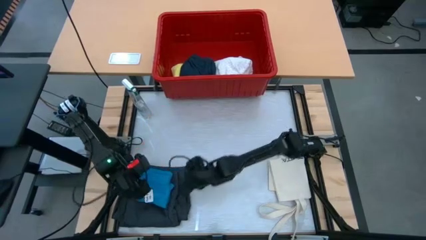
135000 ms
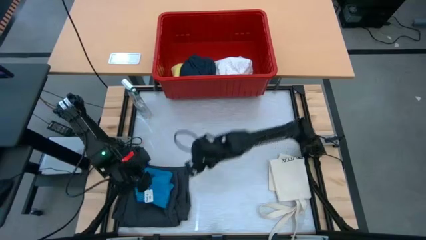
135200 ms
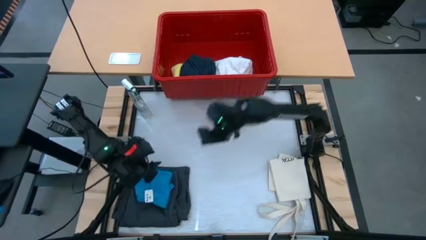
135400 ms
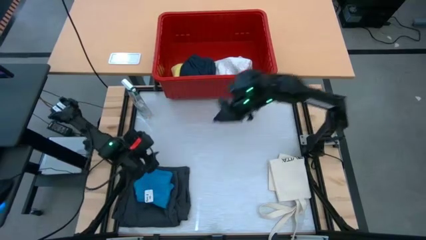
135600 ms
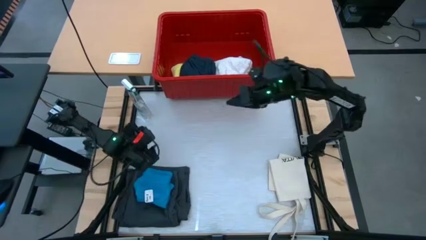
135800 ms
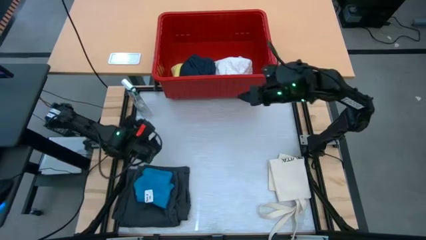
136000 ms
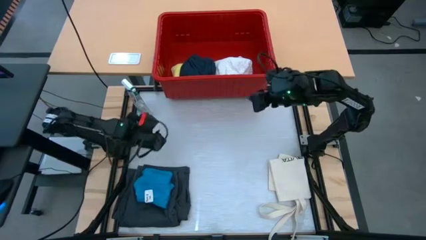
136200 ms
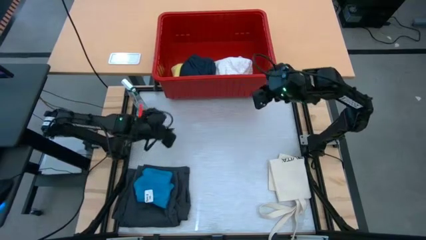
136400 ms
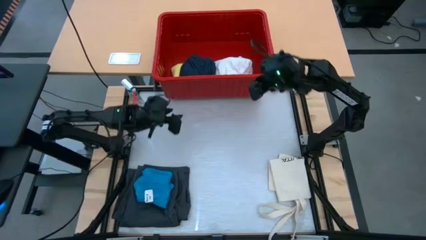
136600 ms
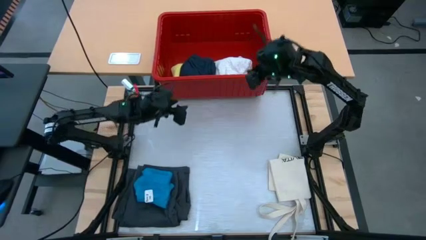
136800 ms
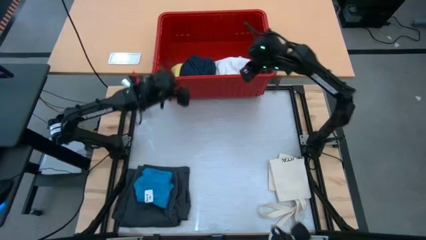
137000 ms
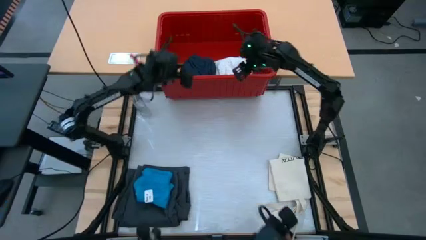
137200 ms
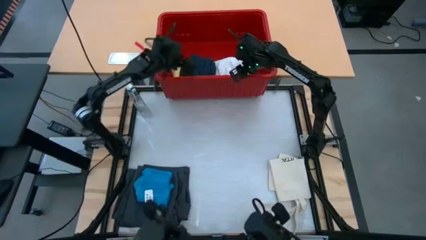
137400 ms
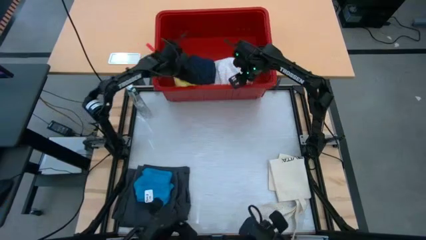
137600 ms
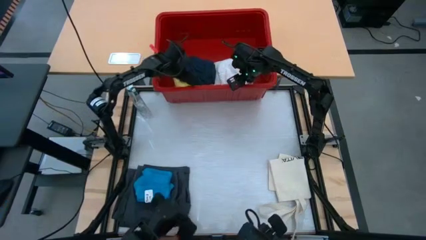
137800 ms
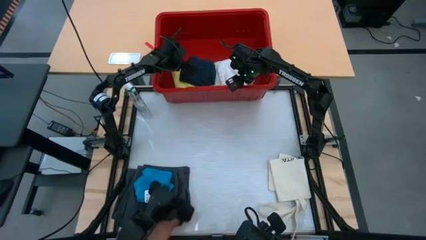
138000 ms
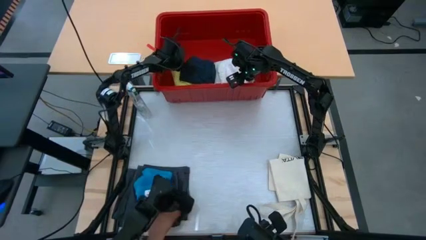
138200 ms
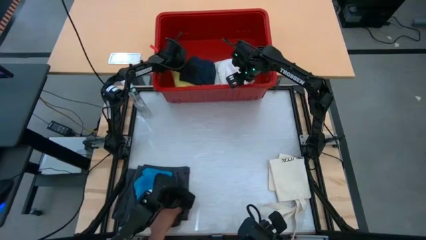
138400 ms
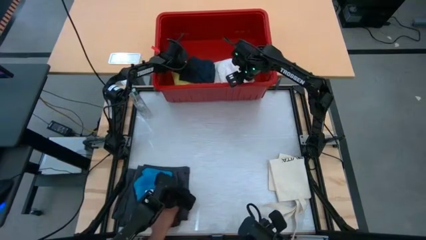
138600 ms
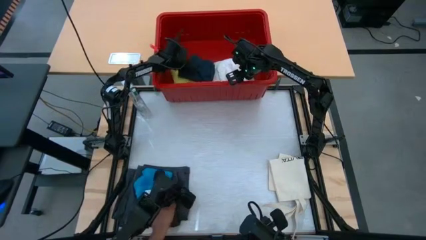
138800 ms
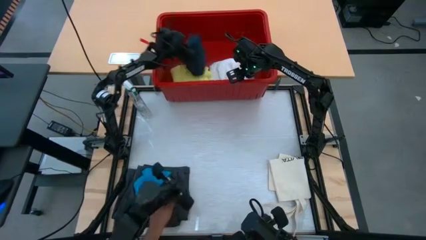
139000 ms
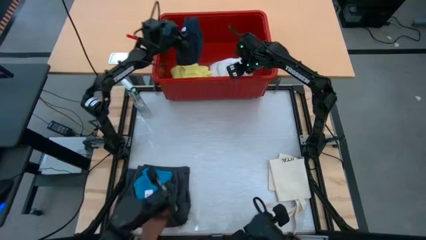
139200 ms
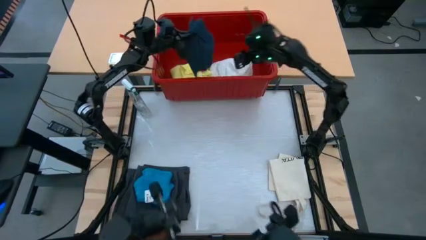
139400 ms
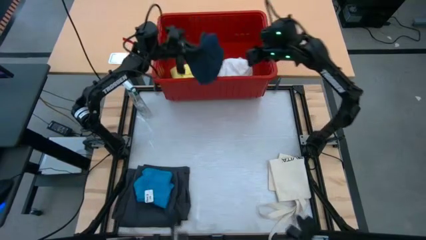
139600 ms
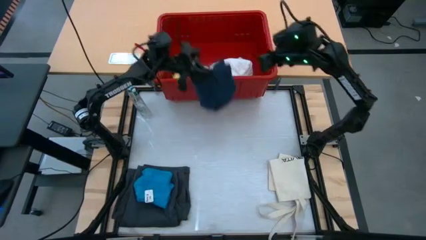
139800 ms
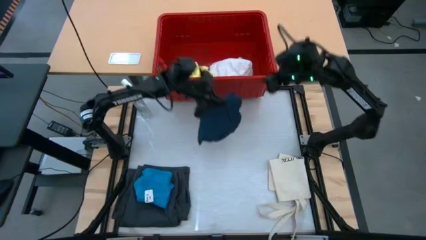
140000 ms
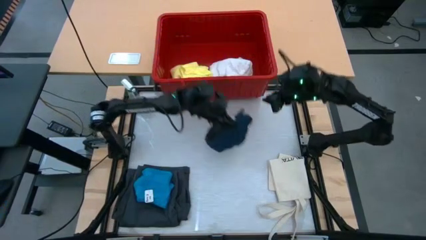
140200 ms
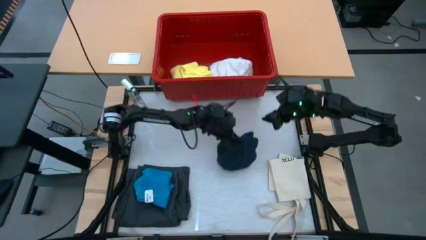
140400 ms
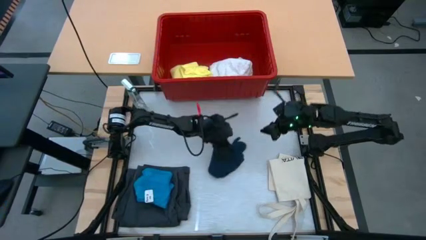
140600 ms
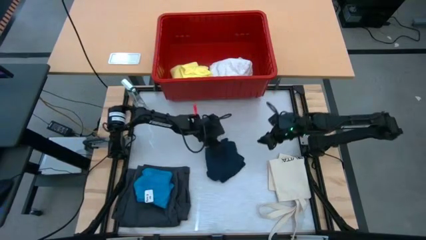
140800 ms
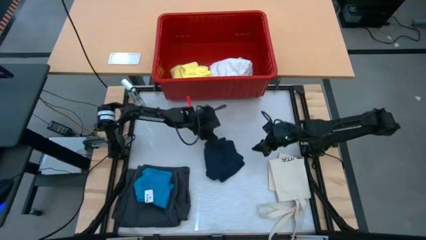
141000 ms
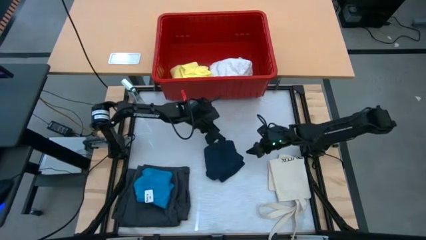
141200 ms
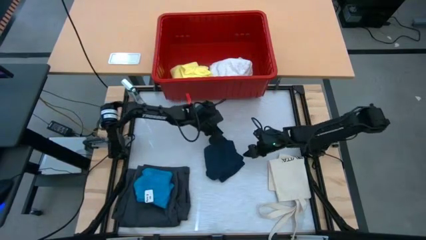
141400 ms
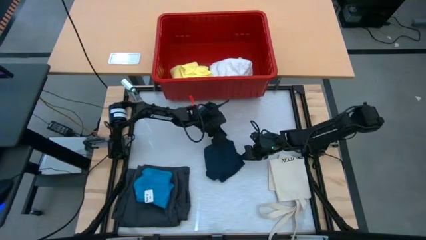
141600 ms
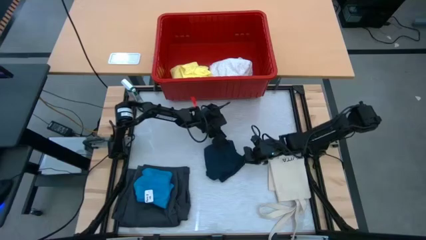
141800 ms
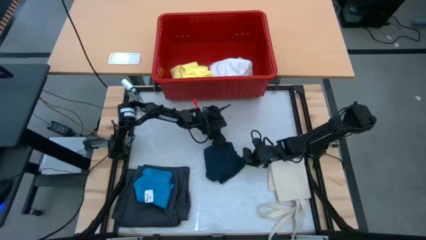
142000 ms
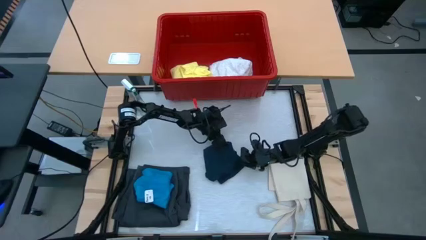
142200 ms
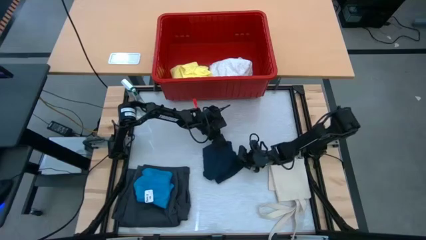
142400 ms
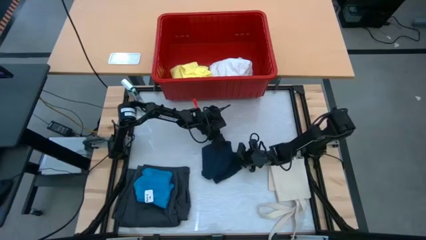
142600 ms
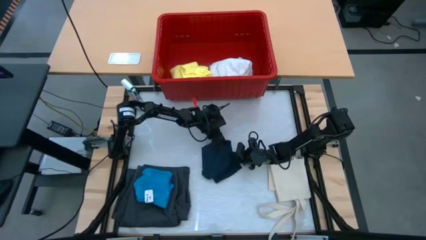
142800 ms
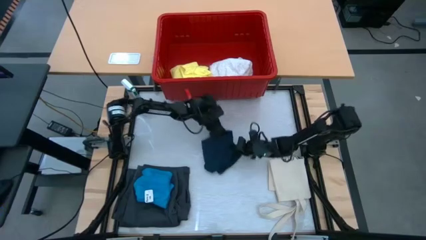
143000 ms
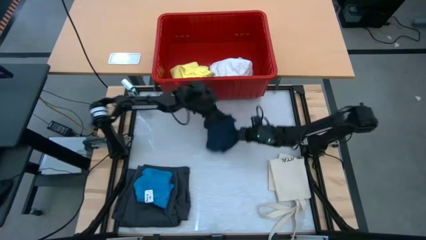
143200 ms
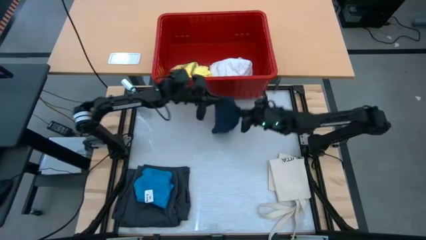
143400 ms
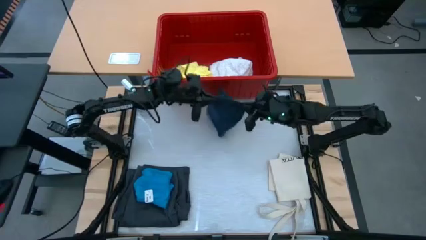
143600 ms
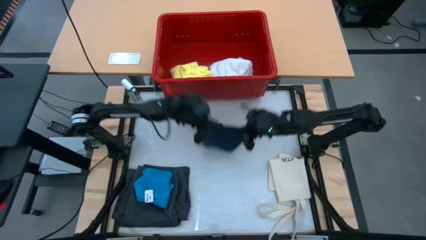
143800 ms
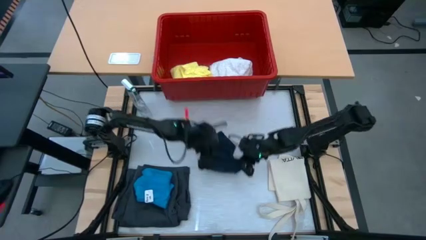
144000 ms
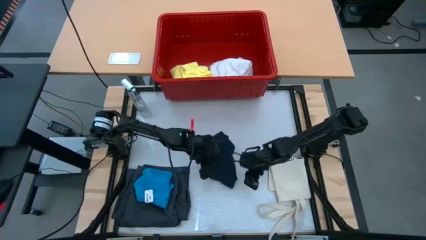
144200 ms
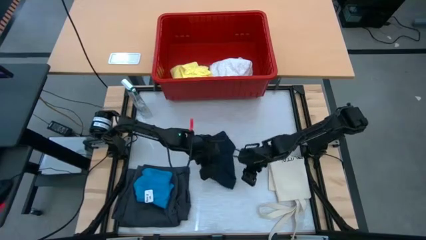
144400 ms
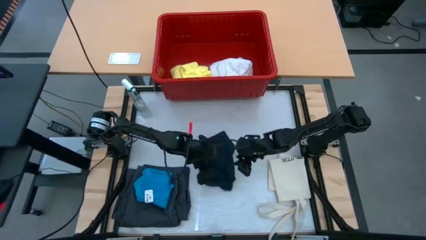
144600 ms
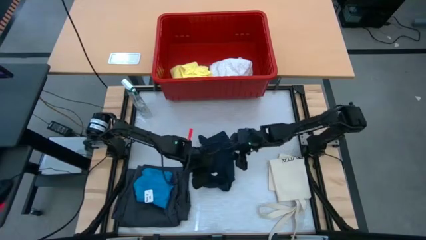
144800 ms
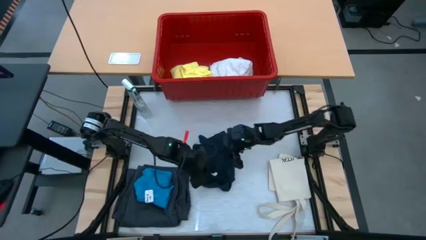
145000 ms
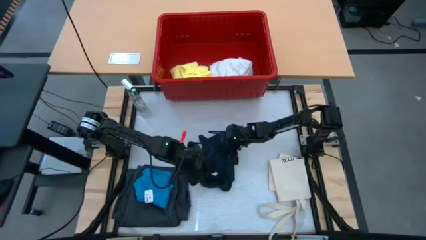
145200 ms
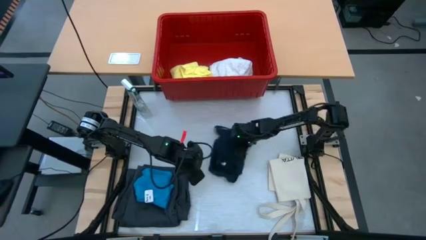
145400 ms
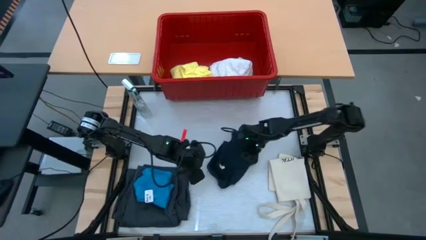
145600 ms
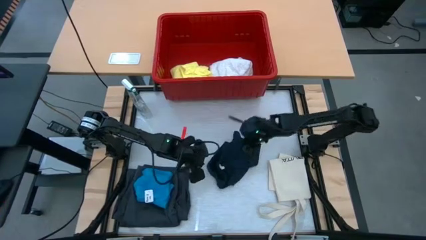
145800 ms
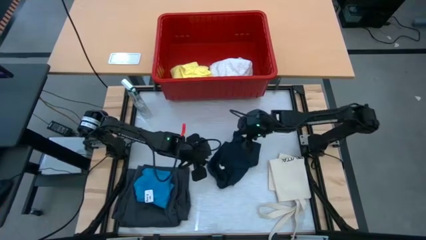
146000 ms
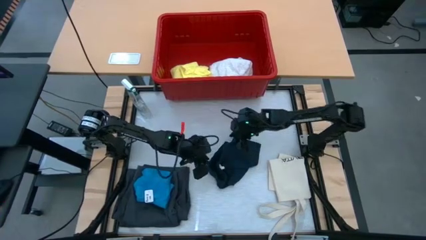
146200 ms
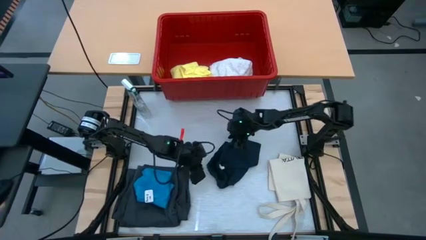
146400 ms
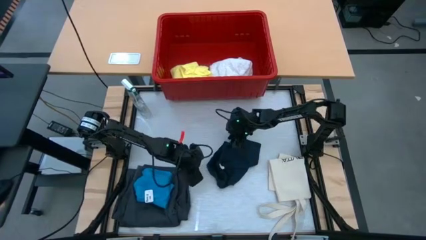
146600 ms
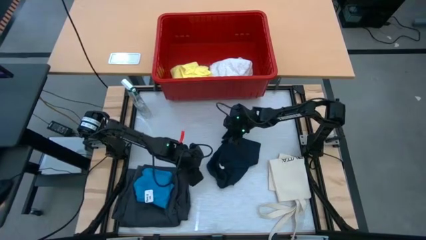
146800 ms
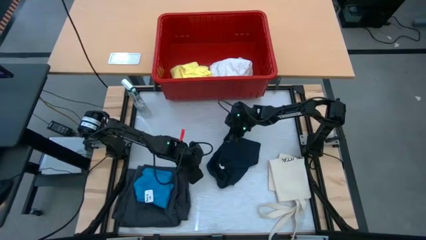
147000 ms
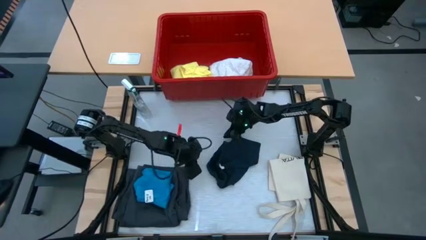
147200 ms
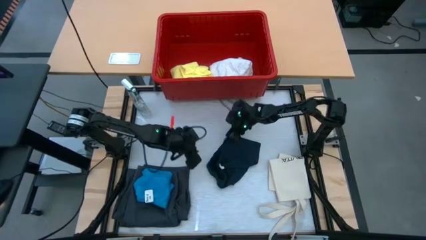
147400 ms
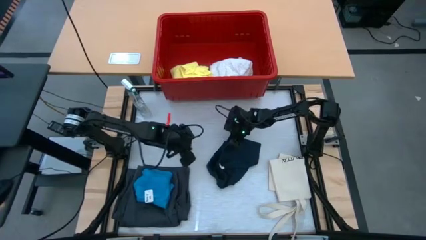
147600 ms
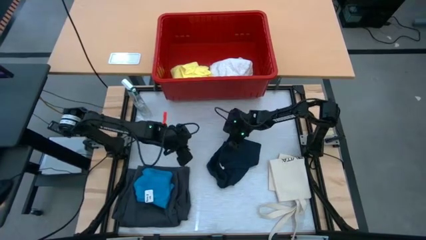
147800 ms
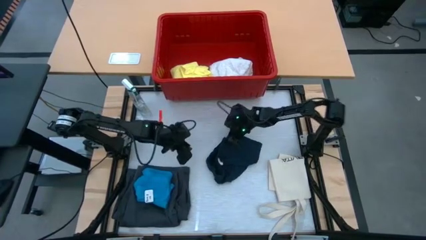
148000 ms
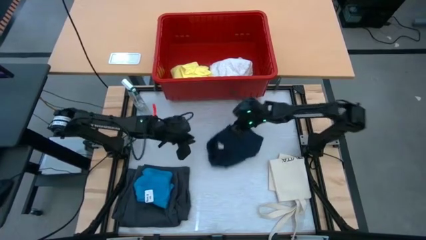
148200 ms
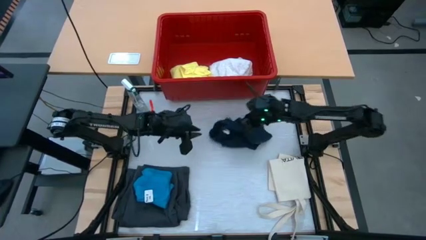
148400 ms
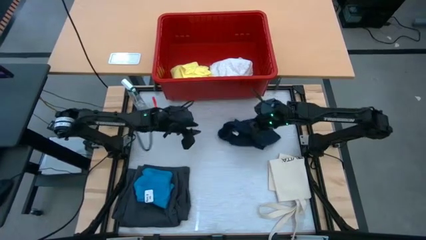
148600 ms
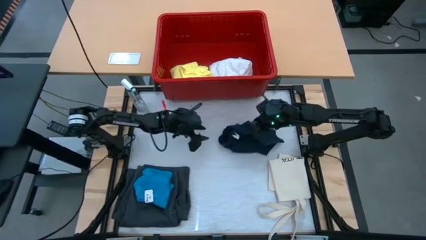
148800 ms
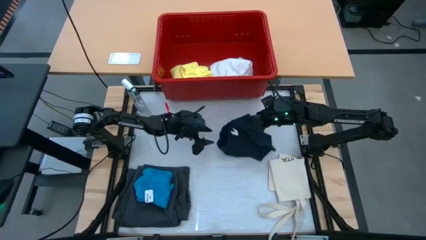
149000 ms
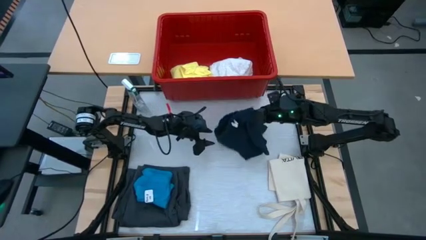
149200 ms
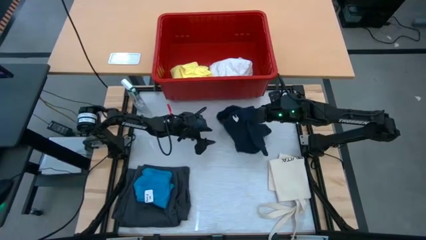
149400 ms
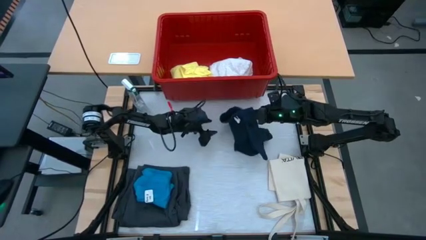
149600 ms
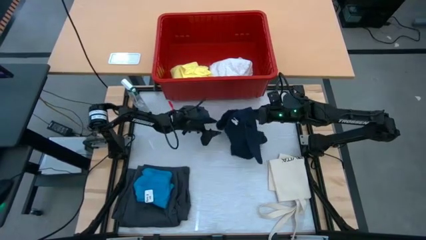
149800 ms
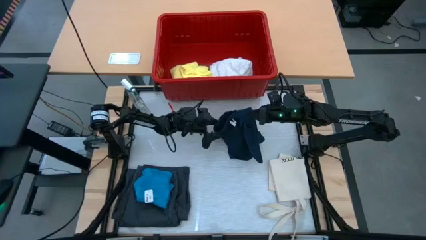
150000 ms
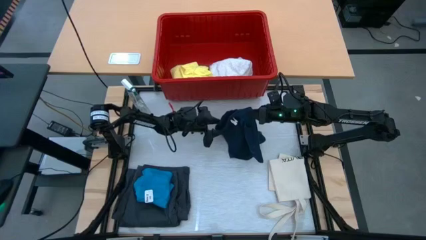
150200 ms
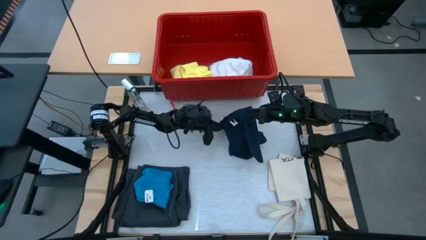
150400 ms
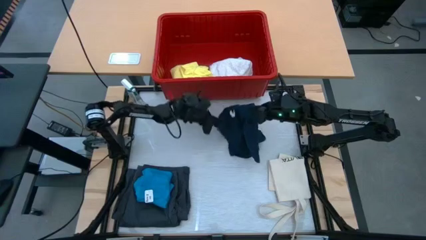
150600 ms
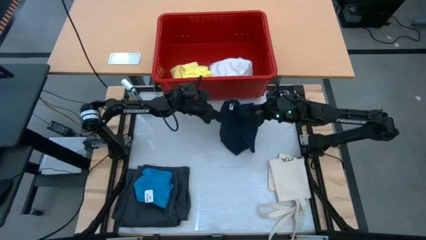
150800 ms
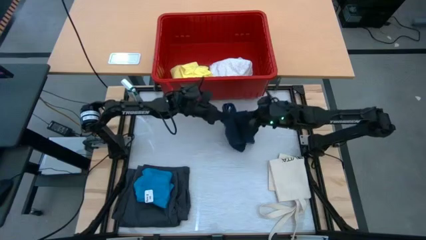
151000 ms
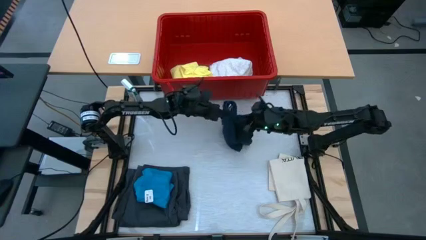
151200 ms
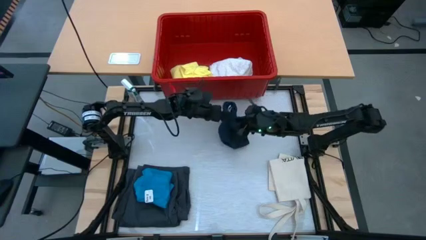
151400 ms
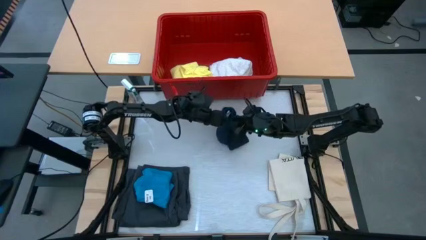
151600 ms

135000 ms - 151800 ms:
Task: Fold laundry
Fold the black shorts
